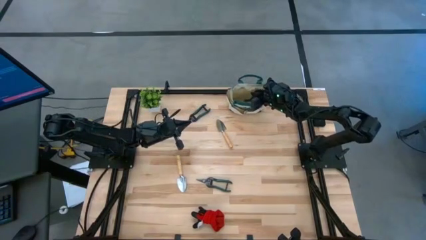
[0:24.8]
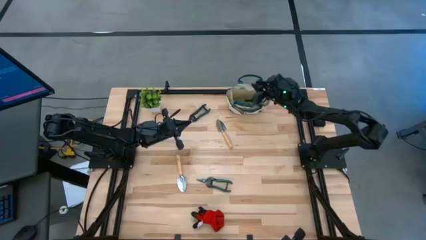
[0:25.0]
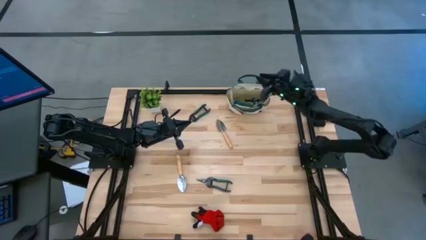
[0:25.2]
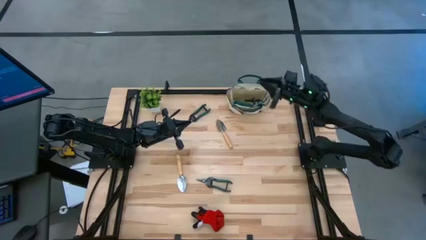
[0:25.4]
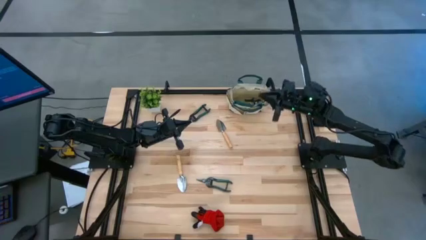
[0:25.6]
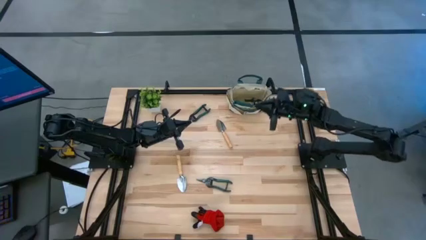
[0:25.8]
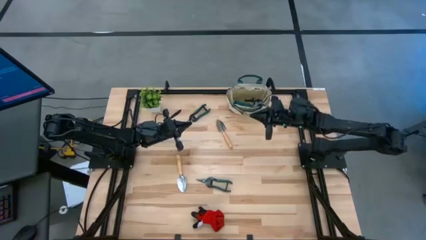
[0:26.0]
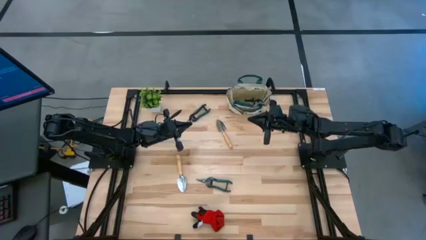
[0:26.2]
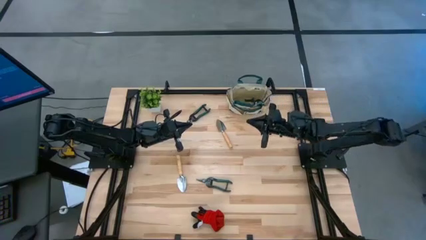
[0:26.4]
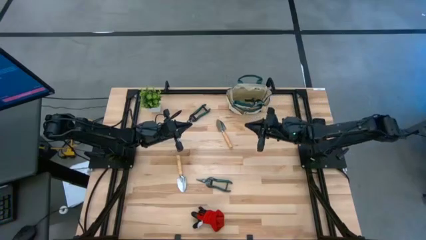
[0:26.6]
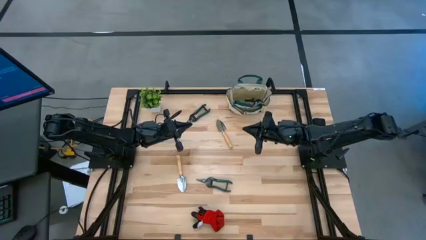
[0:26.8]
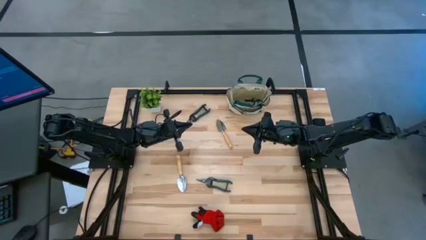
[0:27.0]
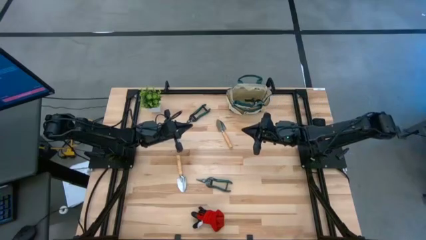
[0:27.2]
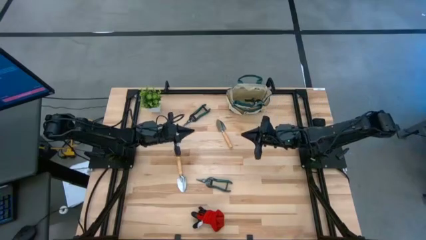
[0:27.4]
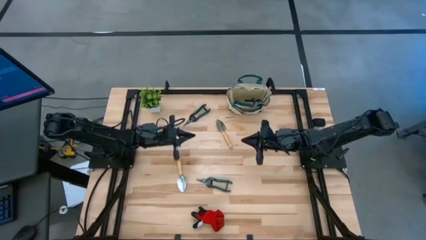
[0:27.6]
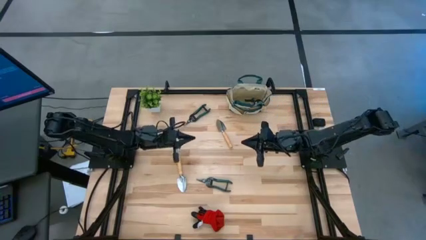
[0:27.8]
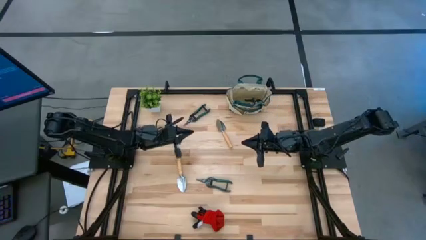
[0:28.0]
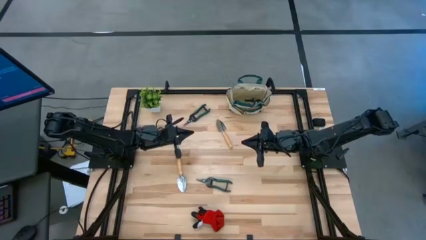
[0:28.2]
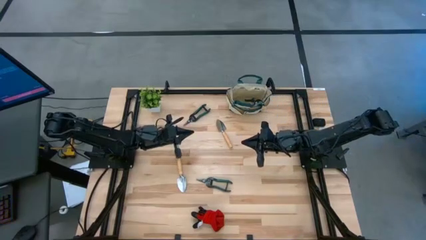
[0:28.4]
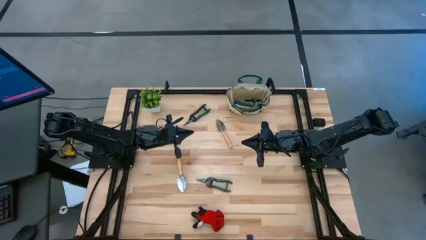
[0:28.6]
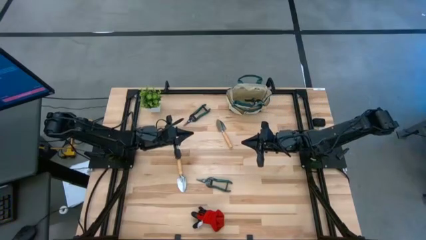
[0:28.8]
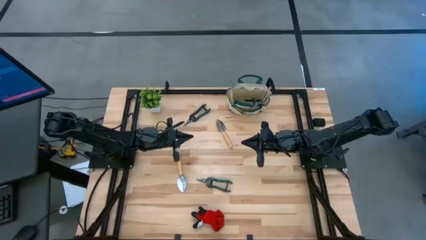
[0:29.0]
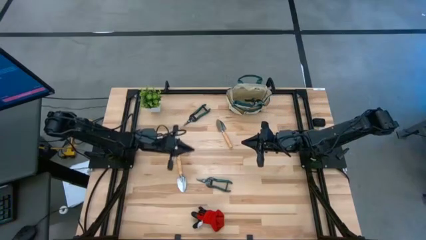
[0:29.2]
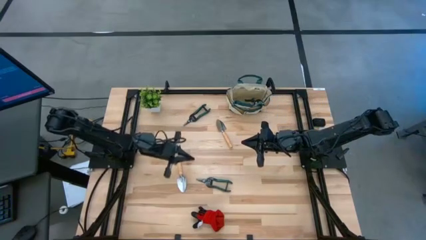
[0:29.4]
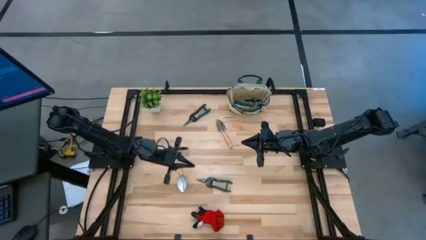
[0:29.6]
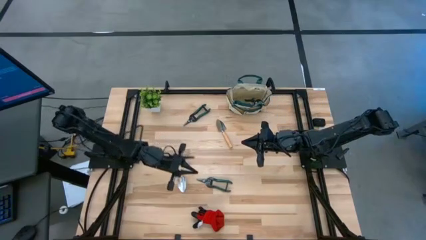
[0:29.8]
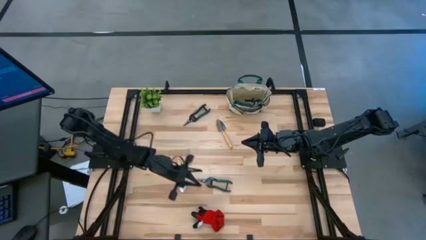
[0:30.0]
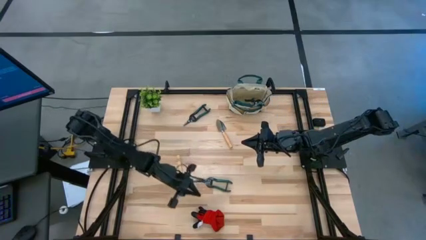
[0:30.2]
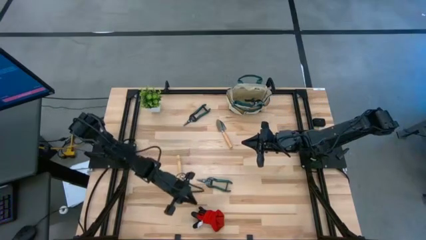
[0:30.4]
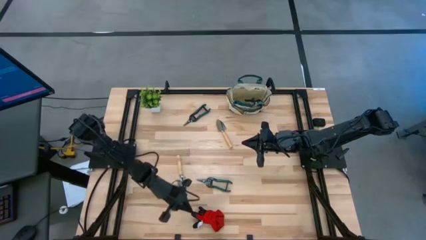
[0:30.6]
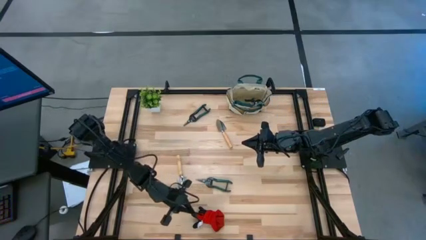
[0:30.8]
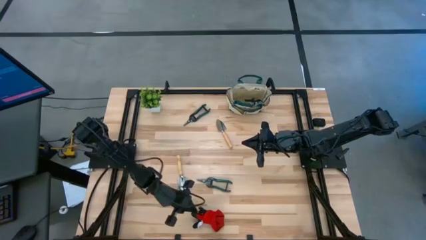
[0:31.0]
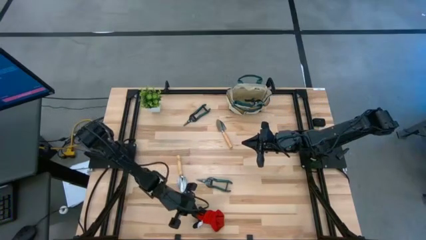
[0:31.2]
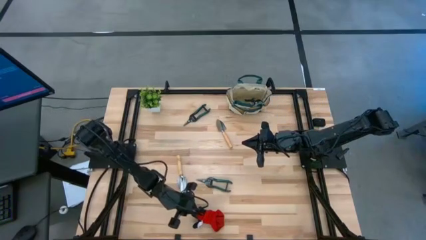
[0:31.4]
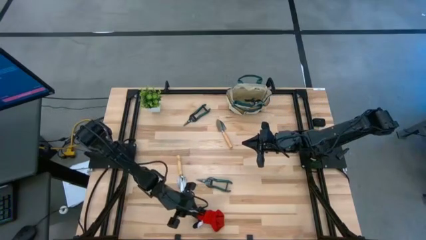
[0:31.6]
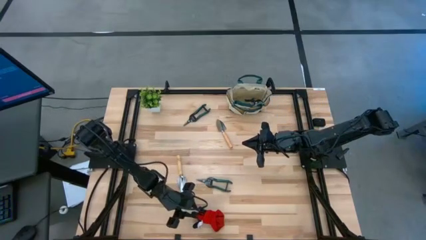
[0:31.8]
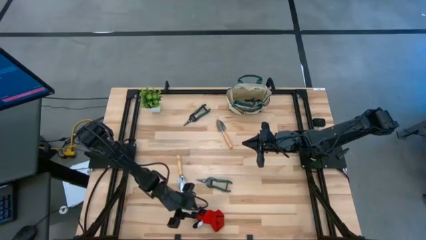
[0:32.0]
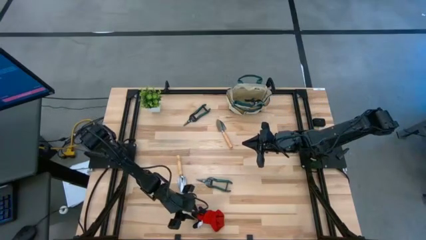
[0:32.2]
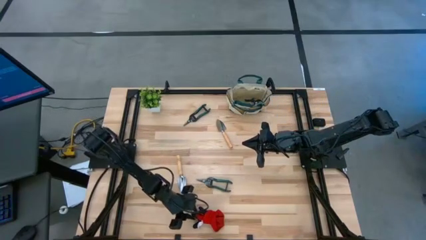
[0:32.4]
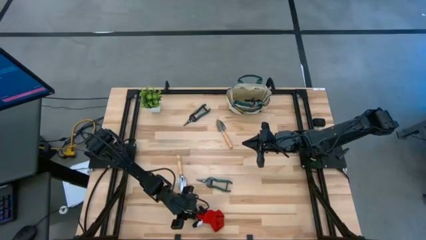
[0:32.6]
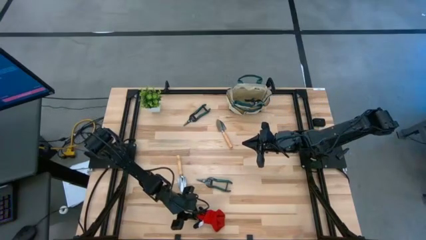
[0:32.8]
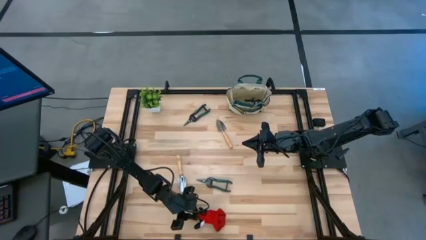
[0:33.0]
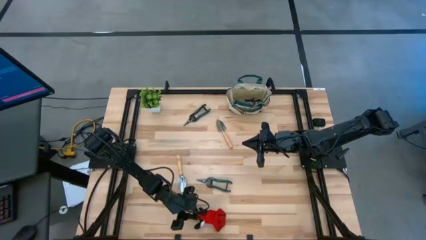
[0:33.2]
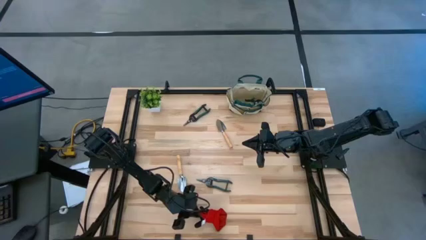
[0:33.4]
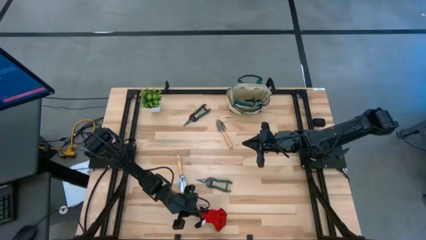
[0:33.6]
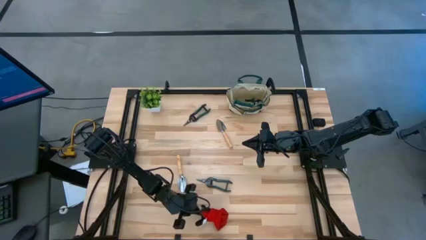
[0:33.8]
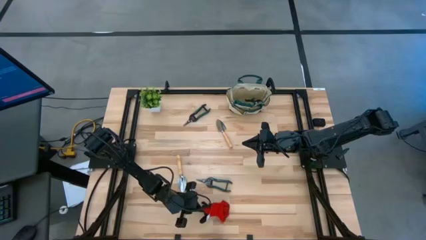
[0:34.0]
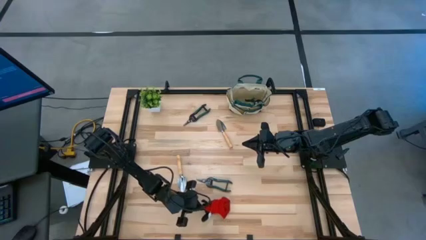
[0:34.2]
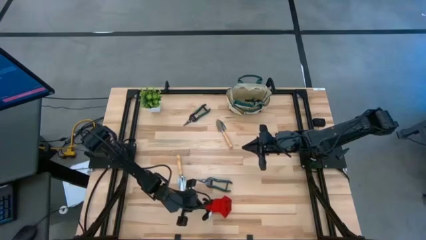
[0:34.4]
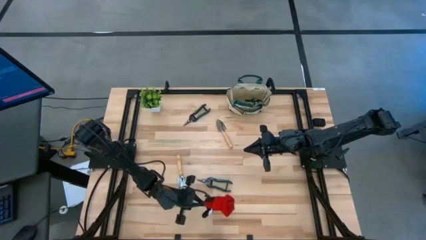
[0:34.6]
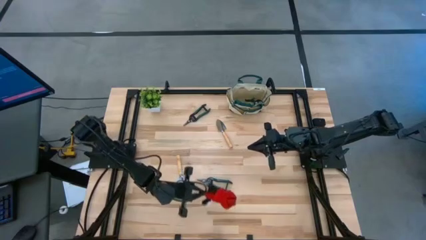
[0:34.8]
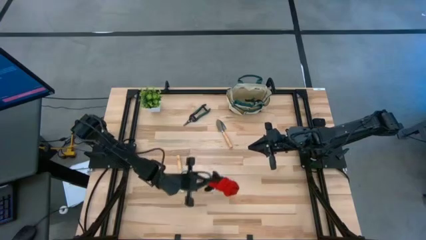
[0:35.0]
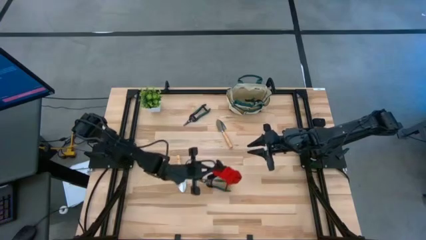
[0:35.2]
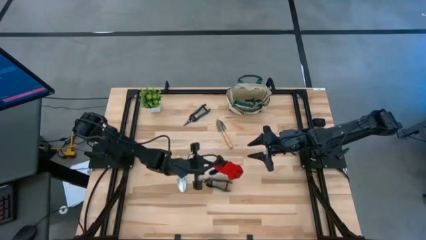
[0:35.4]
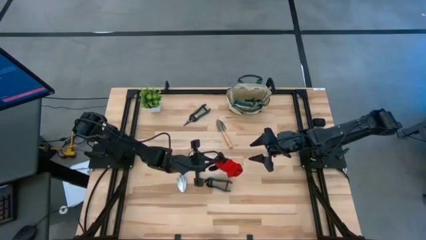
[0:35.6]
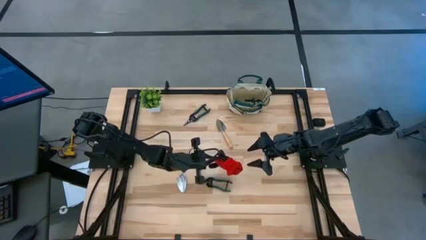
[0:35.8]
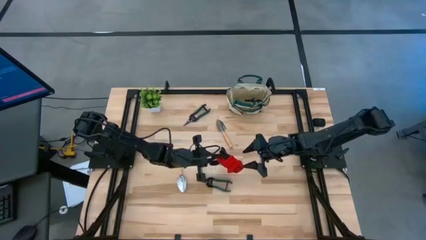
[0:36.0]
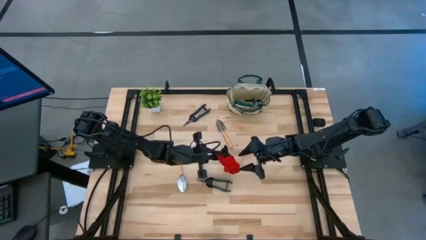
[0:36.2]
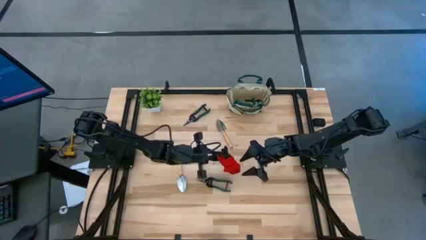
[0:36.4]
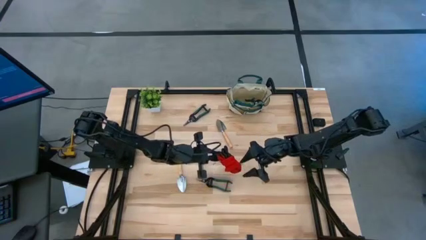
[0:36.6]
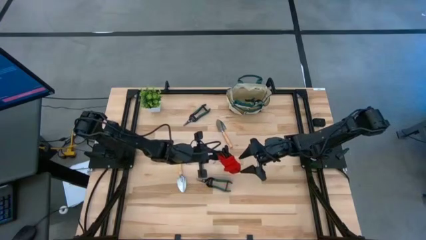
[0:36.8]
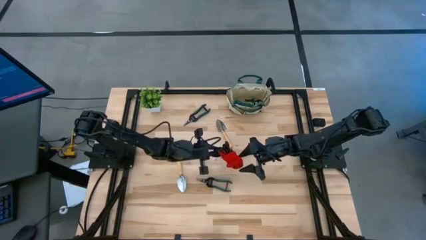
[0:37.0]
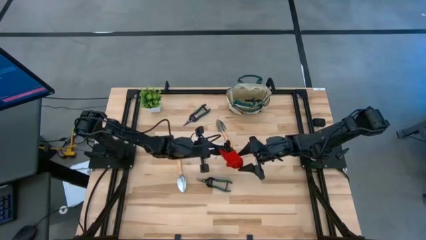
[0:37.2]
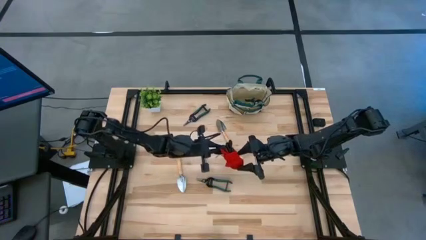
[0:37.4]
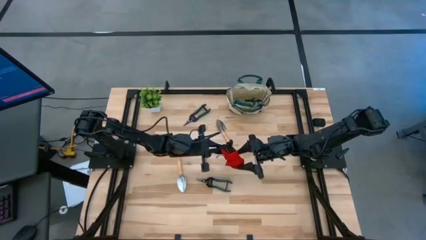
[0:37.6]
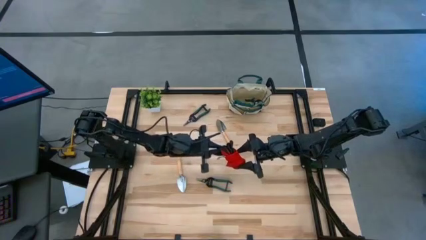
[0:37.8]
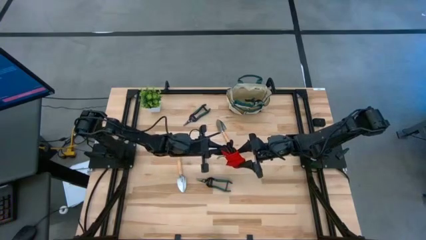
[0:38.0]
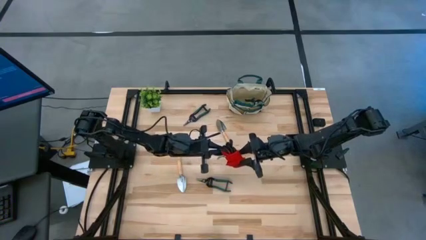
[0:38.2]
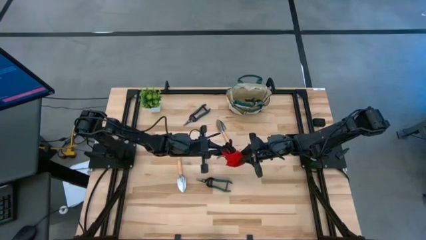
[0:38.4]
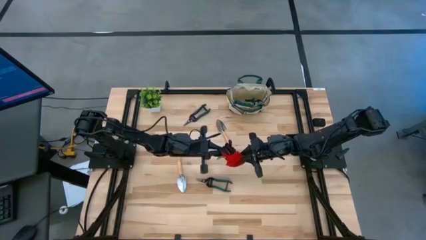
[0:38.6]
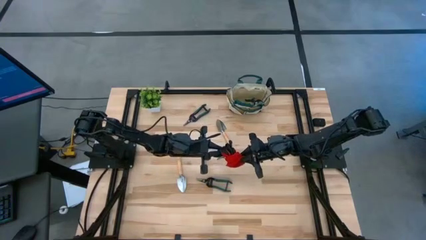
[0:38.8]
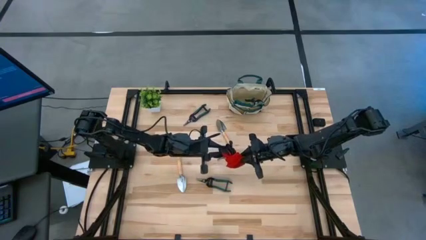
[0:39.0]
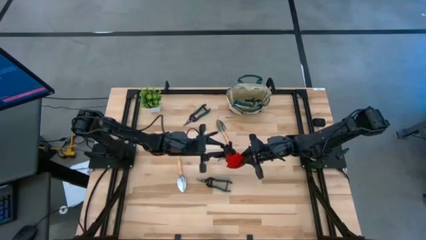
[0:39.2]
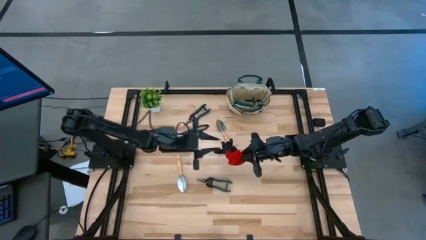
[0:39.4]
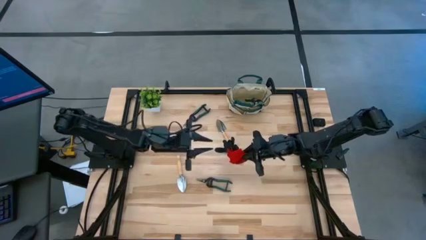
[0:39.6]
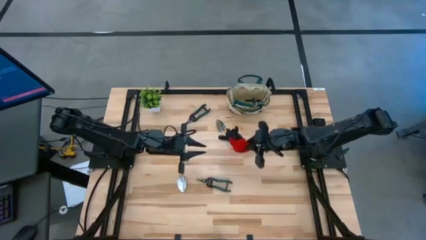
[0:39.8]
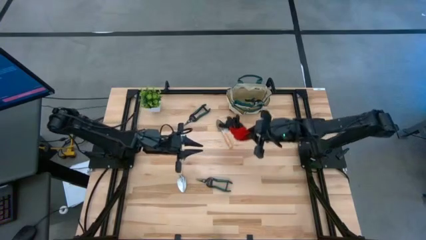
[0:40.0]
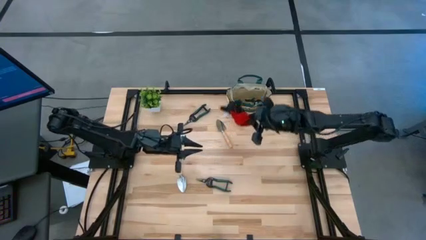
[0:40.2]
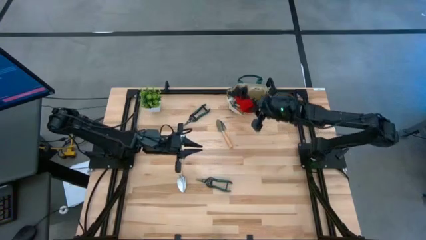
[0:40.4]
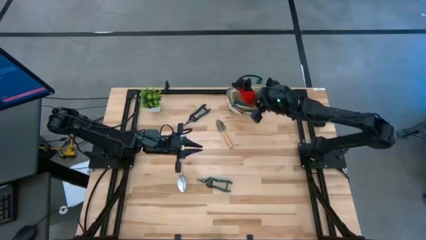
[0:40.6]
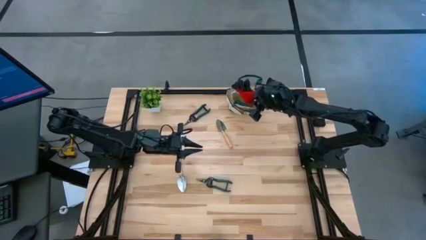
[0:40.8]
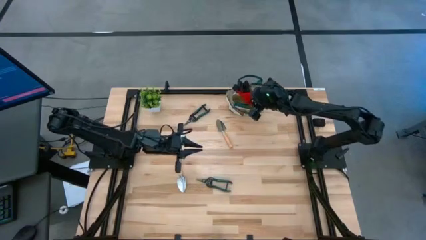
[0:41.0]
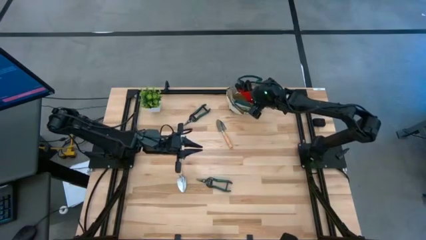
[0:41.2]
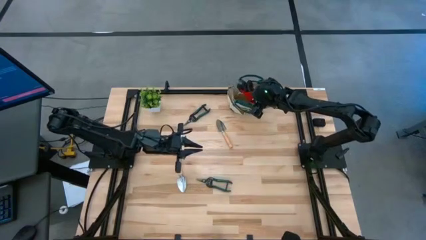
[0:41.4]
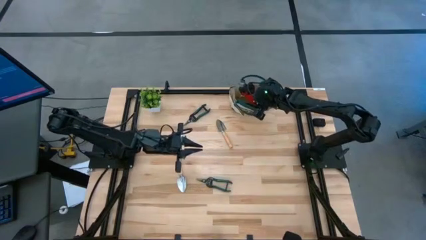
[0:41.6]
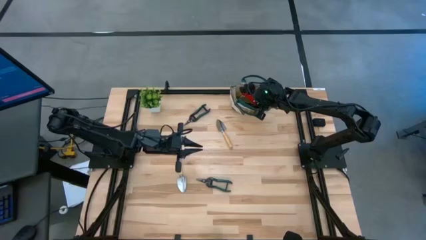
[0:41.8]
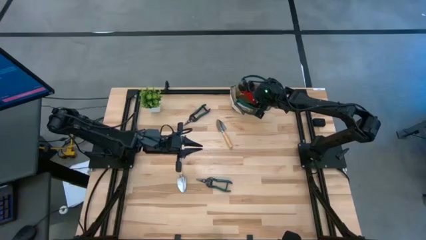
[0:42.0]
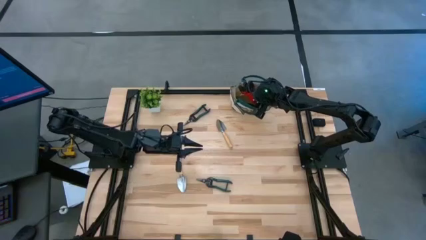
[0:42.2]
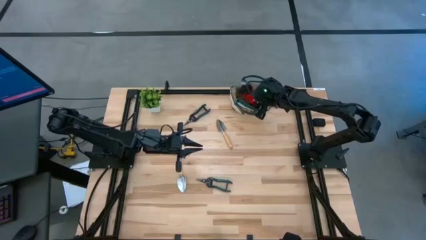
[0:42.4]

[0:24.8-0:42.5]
Task: Pick & Place Garden tools in Gardening bag
Put the red gloves into the gardening bag
